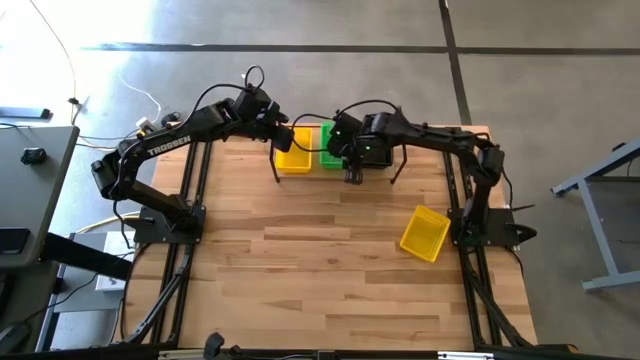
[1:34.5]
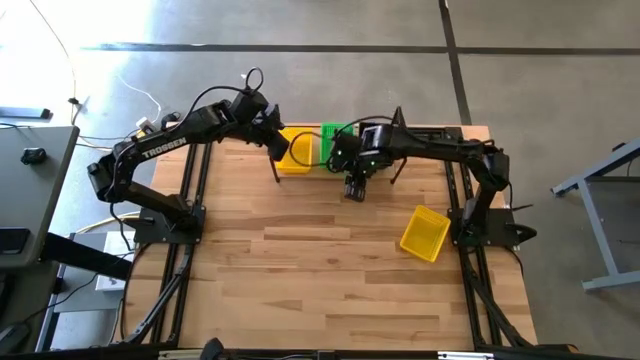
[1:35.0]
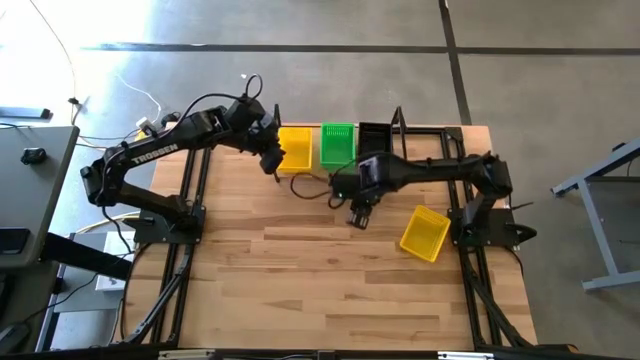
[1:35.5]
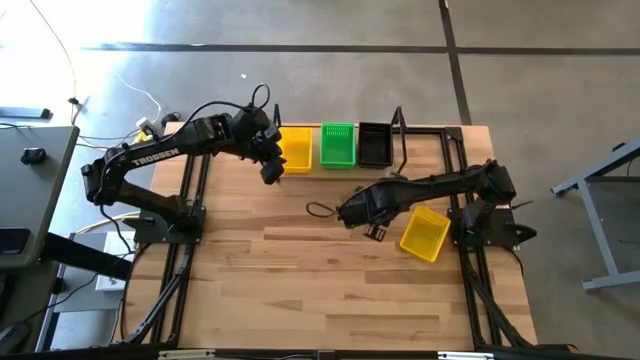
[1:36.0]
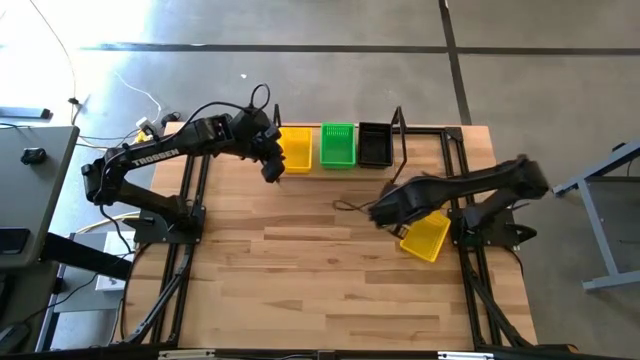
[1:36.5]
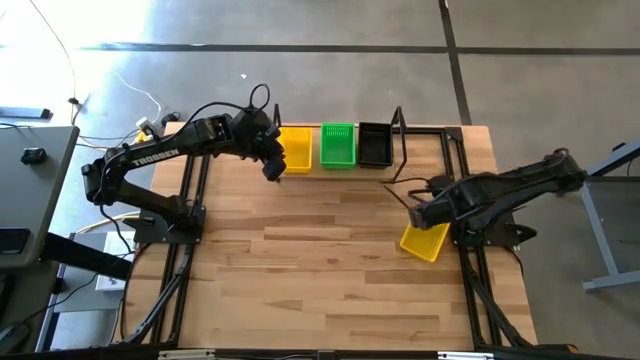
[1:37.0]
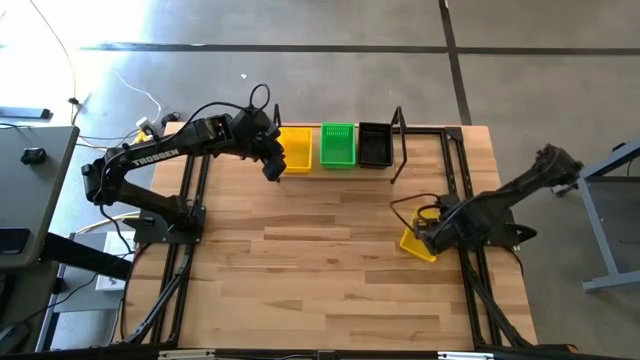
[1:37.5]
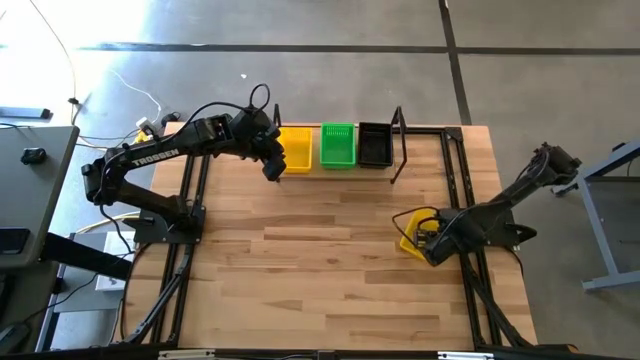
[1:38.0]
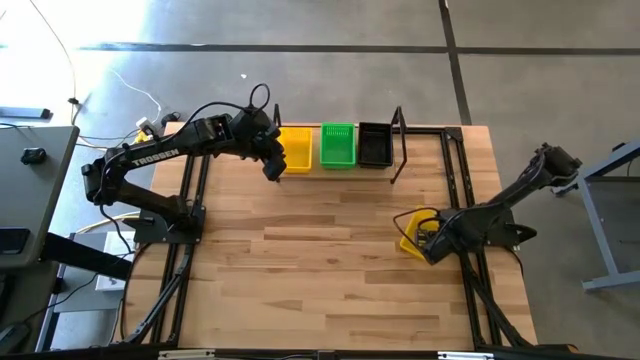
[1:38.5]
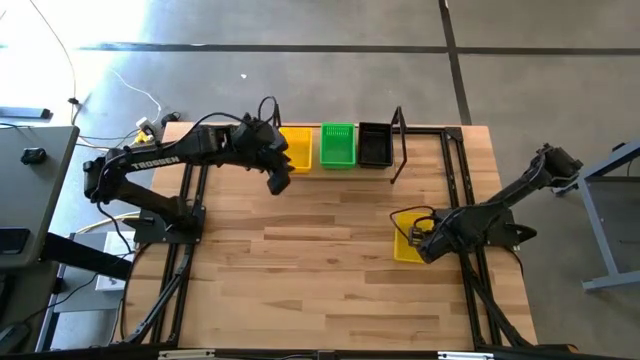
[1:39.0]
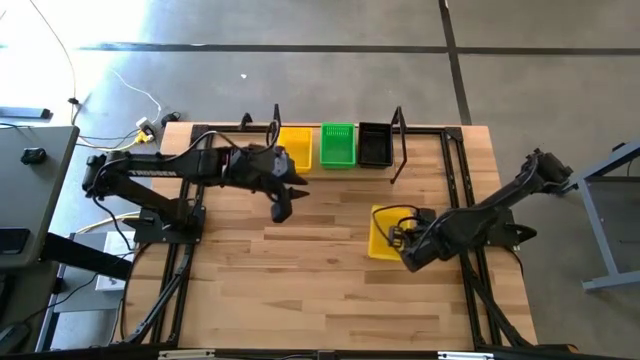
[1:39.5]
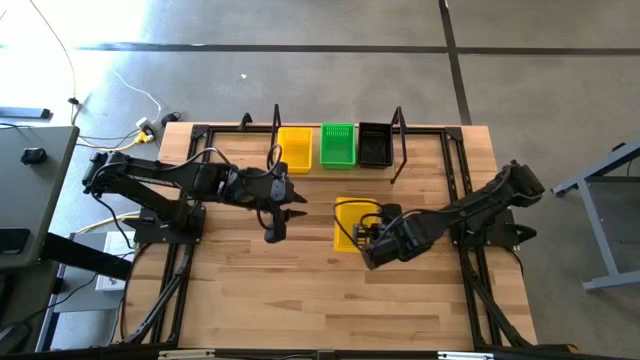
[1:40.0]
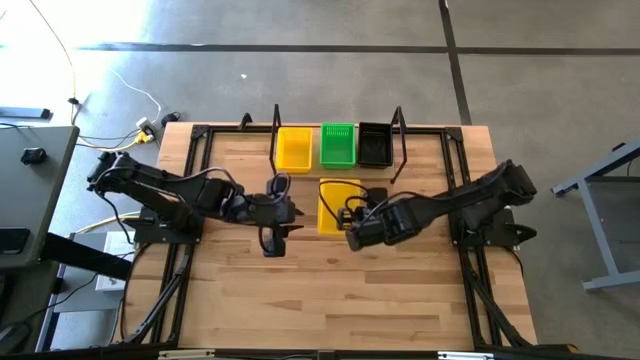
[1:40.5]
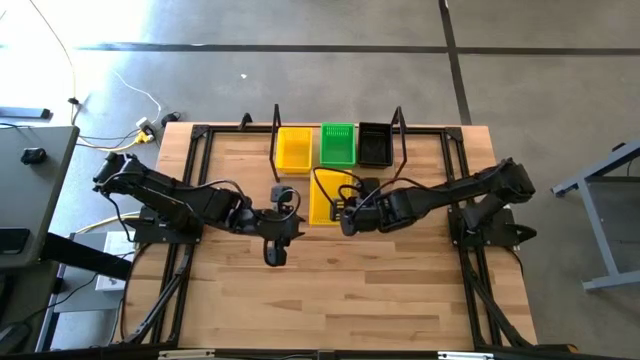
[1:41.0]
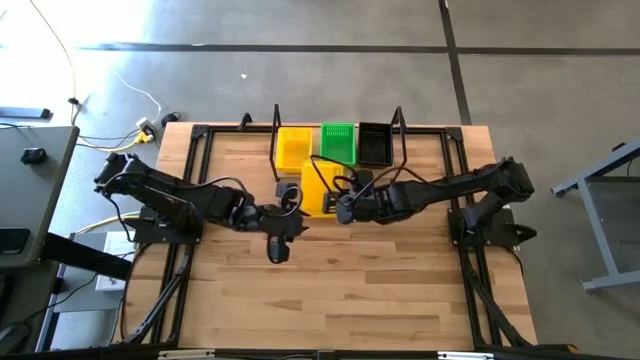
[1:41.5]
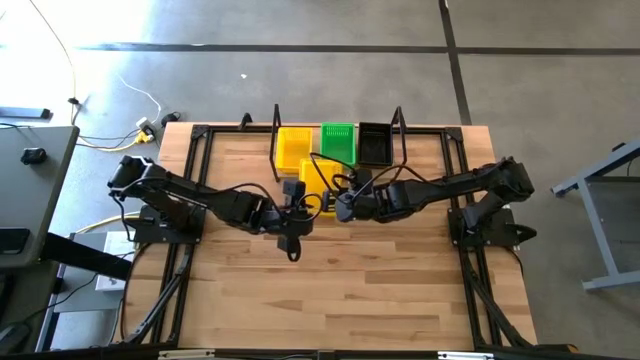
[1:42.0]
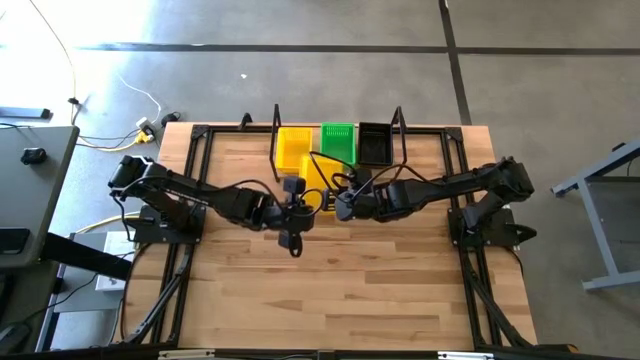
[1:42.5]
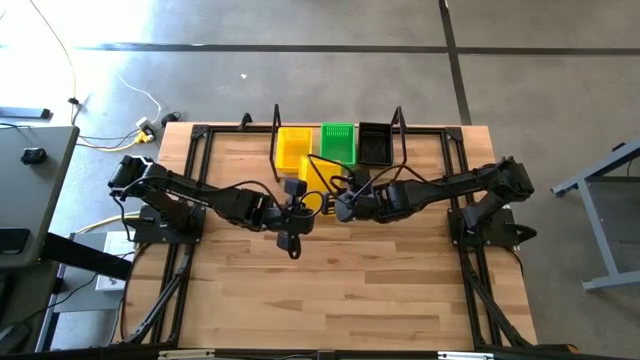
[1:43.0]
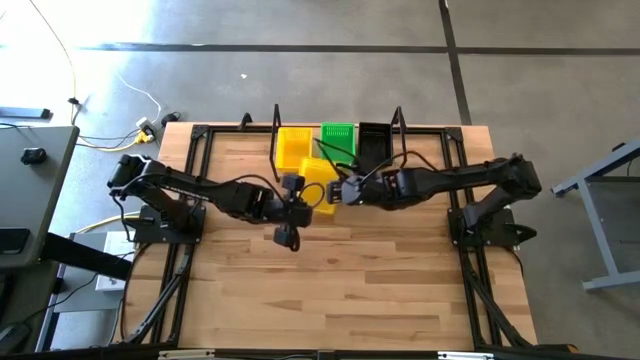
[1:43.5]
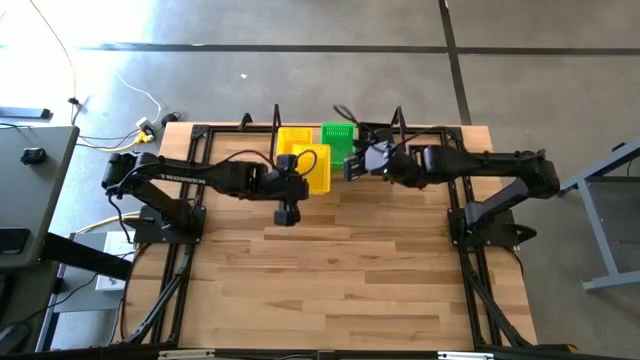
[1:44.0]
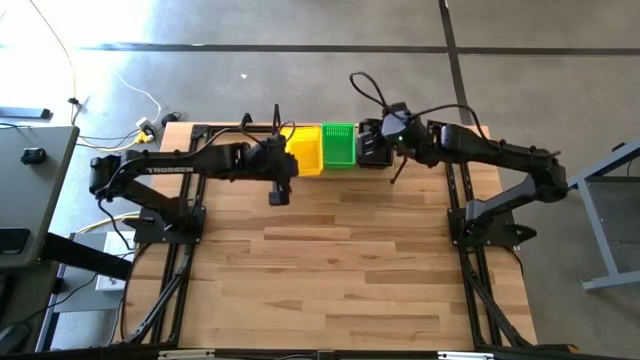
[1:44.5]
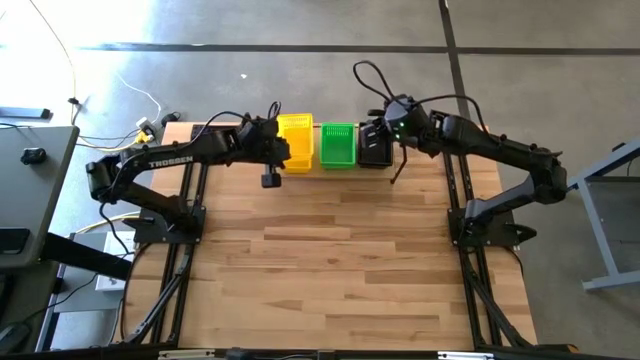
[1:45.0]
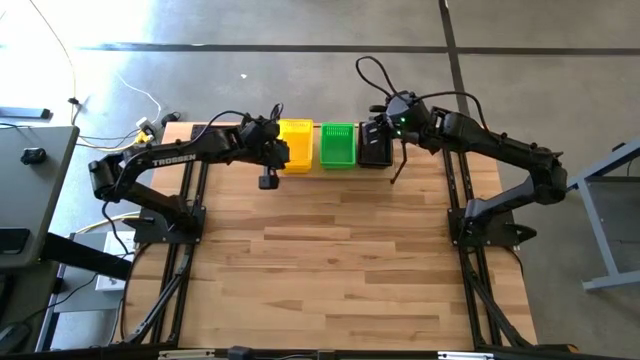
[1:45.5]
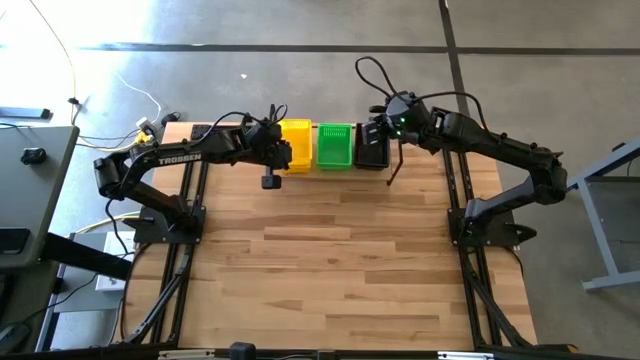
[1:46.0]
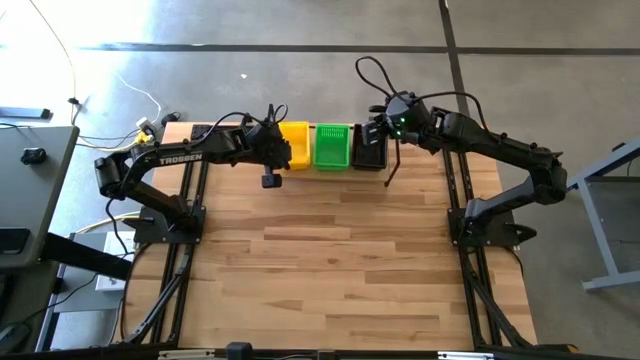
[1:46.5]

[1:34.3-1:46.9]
Task: Stack baskets on shelf by color
Stack the yellow bin on the other stacked yellow bin on the shelf

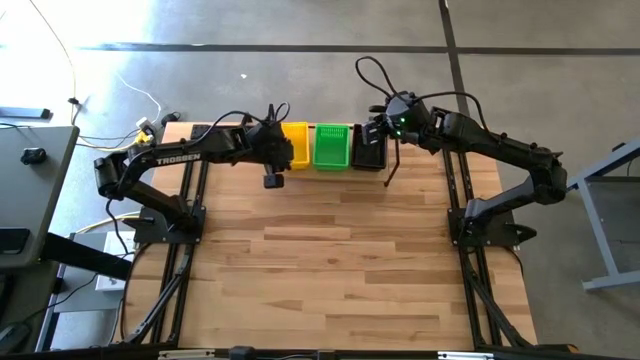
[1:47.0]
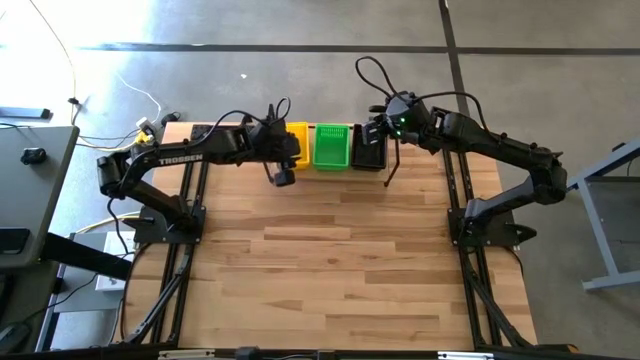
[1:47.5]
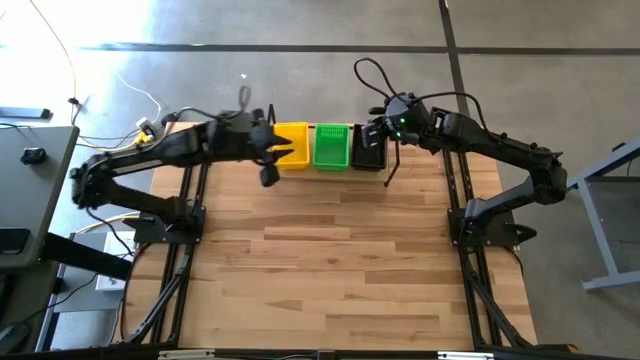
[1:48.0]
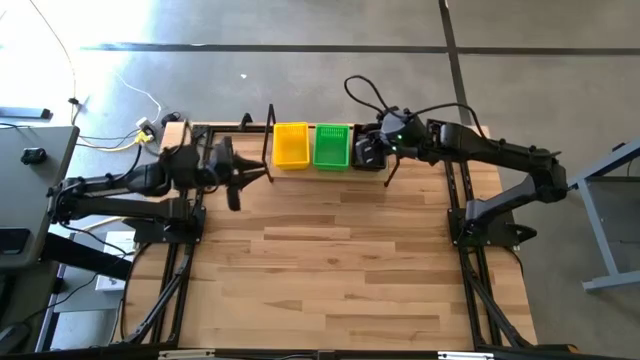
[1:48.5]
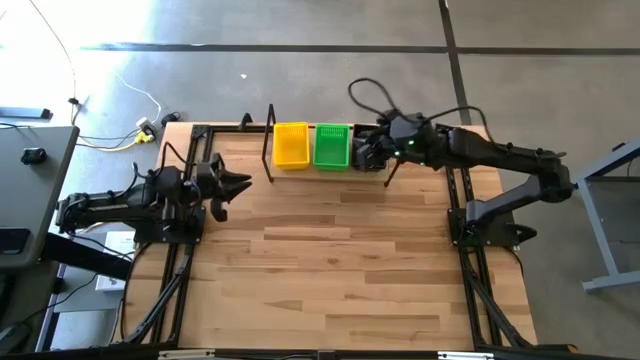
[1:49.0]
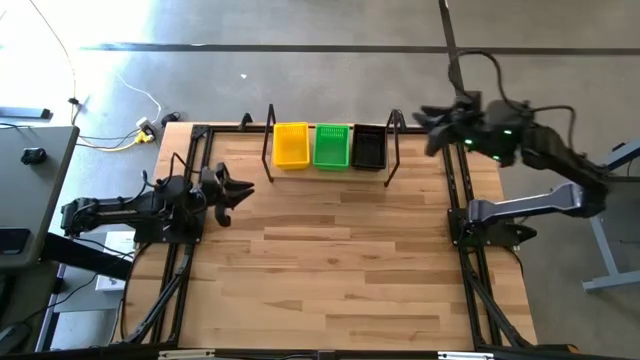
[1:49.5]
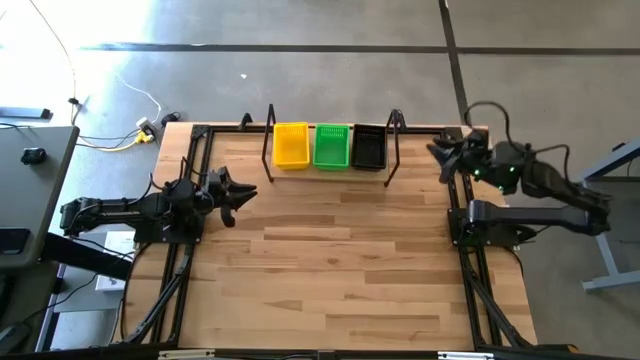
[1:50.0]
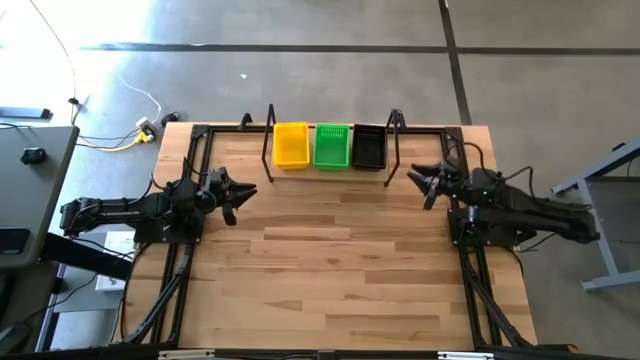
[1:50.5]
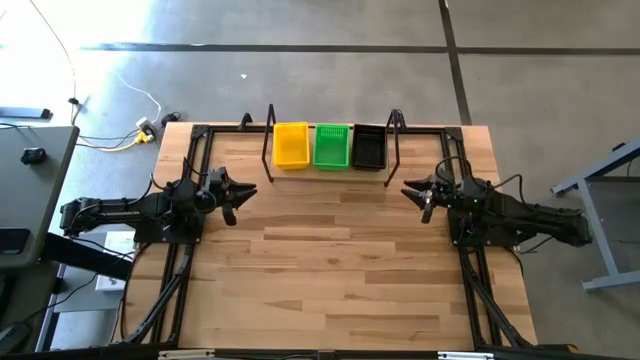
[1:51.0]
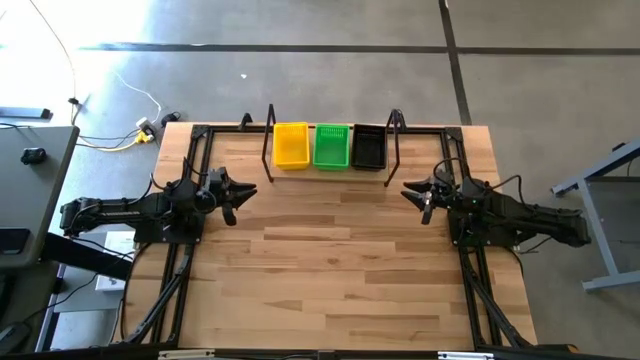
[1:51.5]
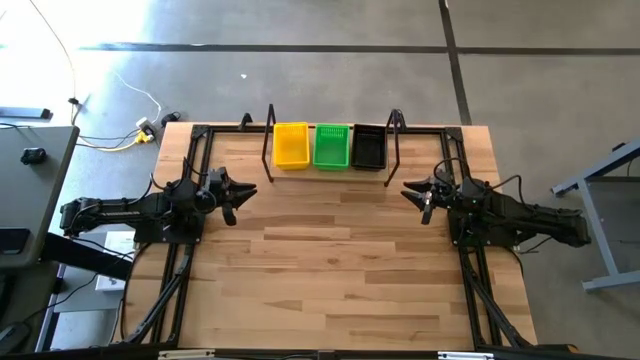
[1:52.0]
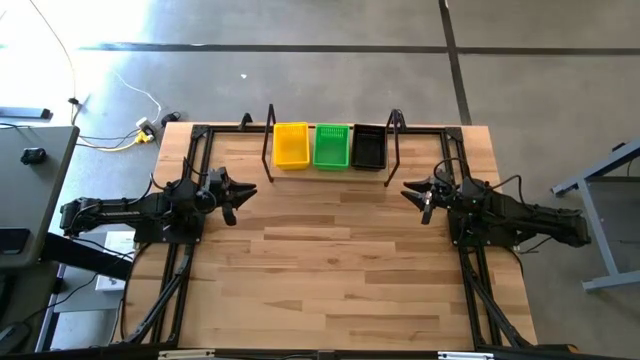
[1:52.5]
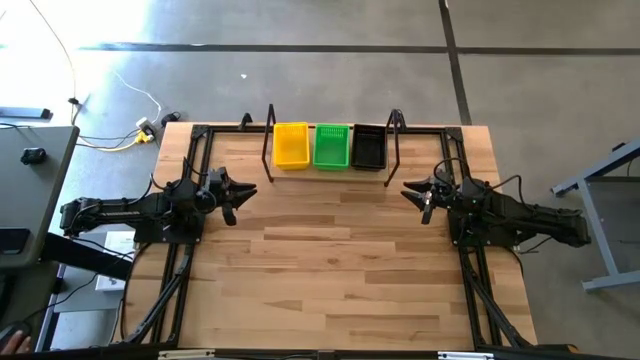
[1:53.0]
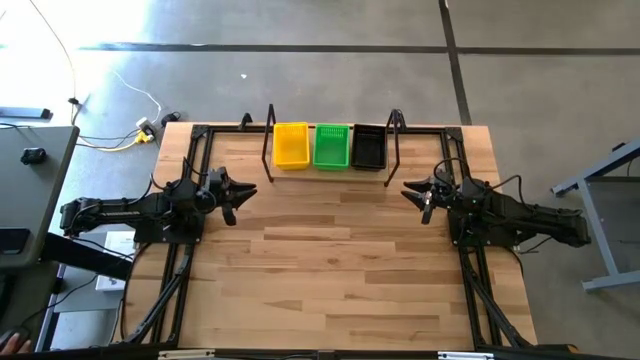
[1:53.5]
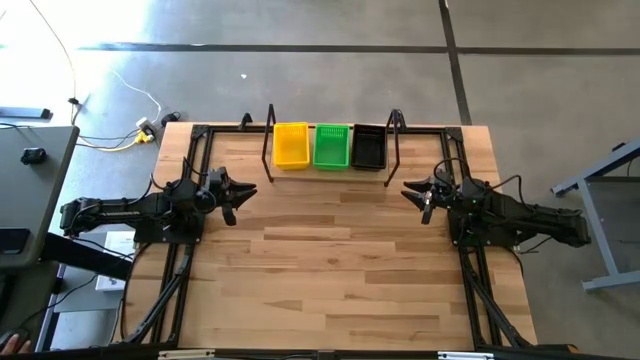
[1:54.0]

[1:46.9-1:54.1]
Return to Home Position

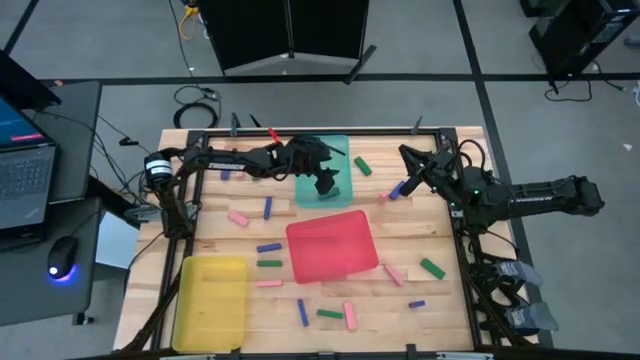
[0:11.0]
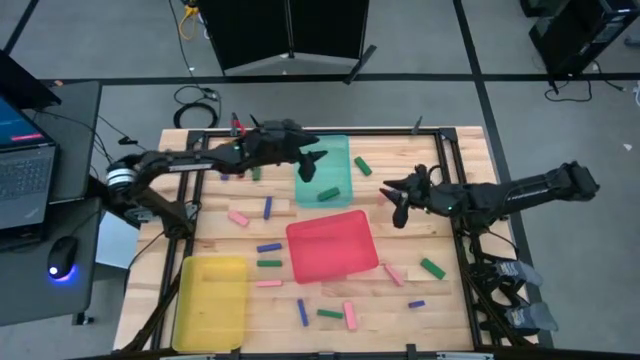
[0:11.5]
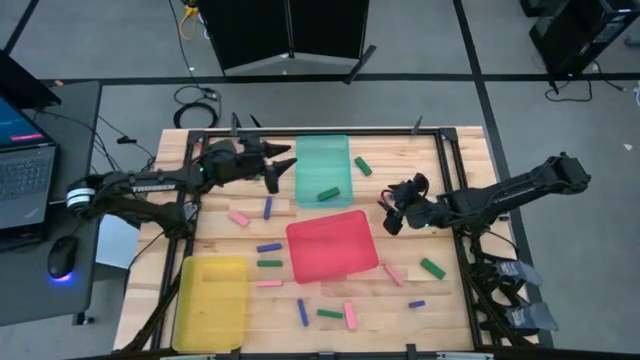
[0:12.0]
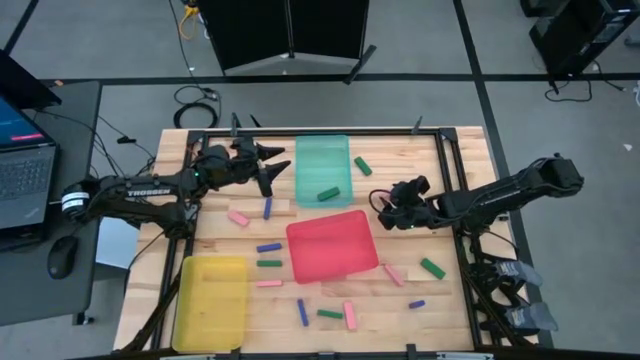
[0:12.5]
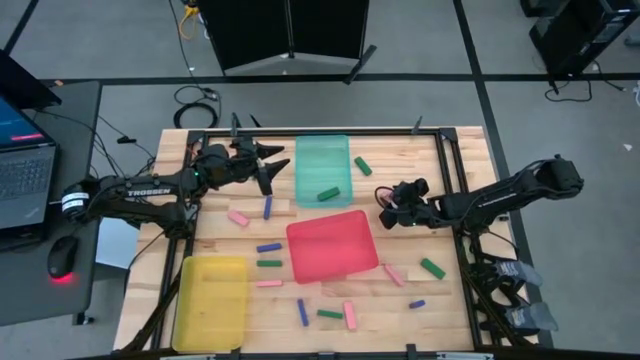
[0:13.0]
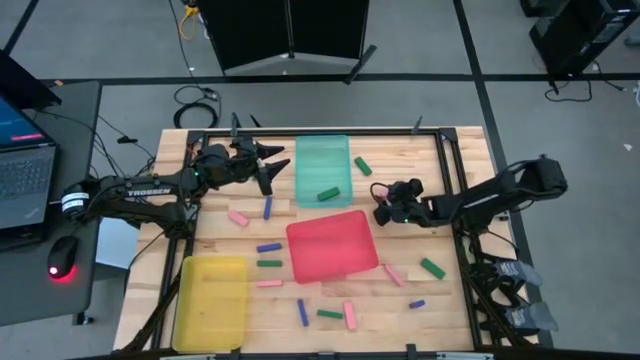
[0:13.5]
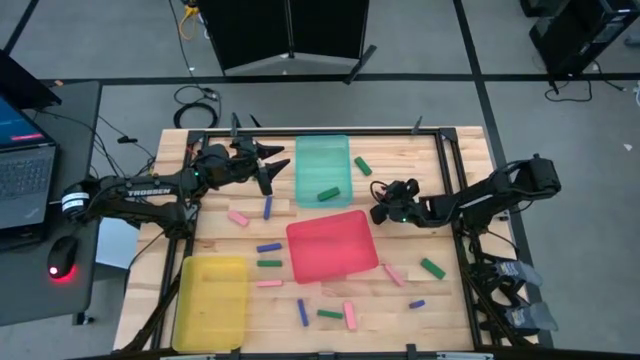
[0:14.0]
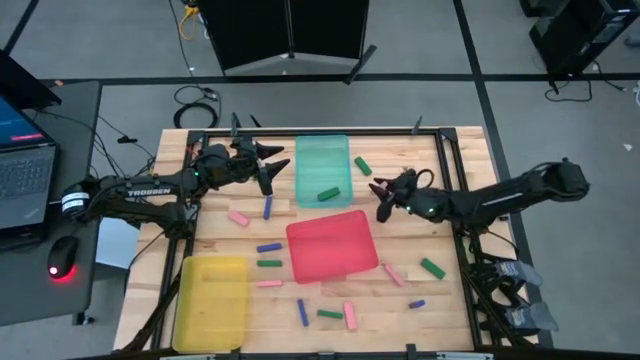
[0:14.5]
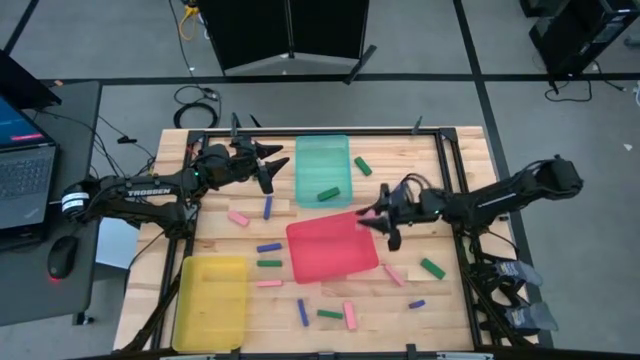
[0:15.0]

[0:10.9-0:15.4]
Task: Sort blocks
Put the pink block into the pink bin
